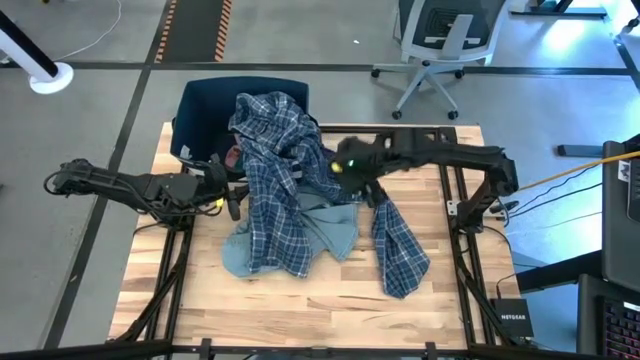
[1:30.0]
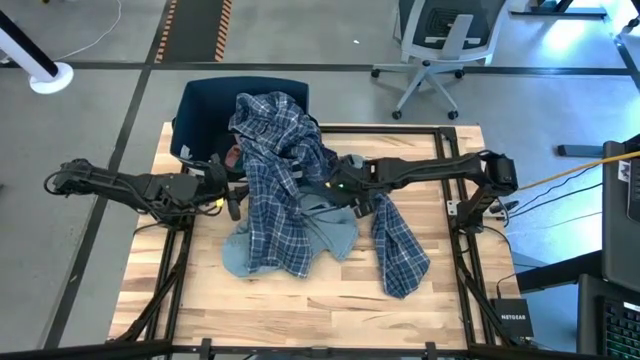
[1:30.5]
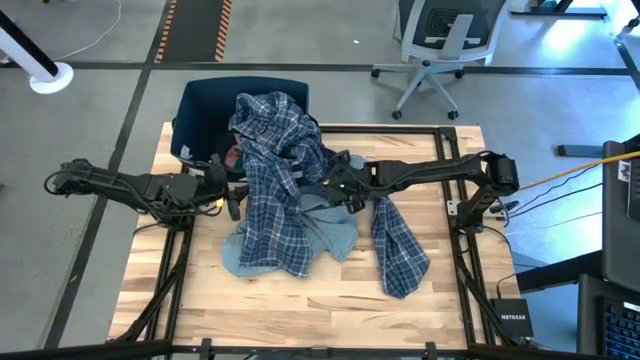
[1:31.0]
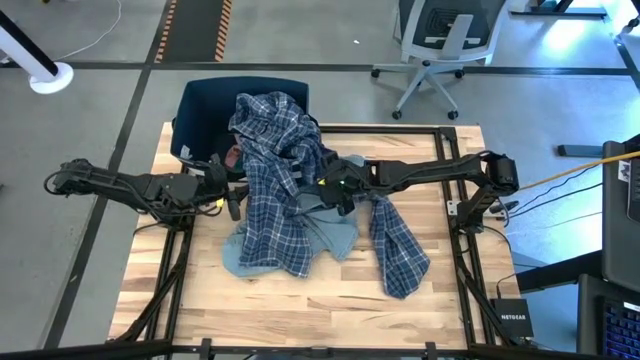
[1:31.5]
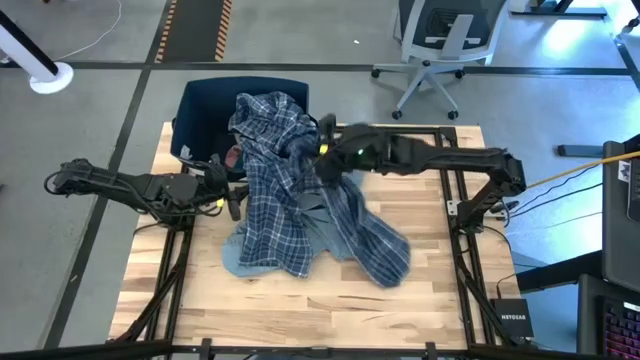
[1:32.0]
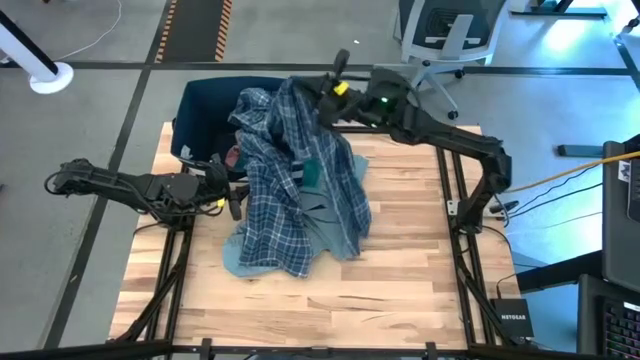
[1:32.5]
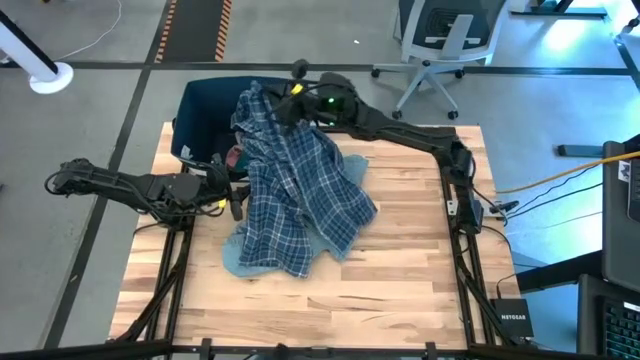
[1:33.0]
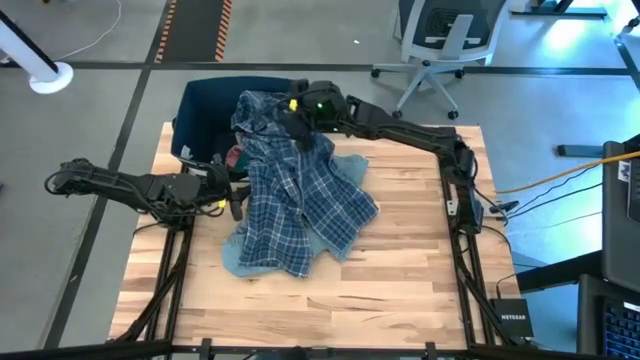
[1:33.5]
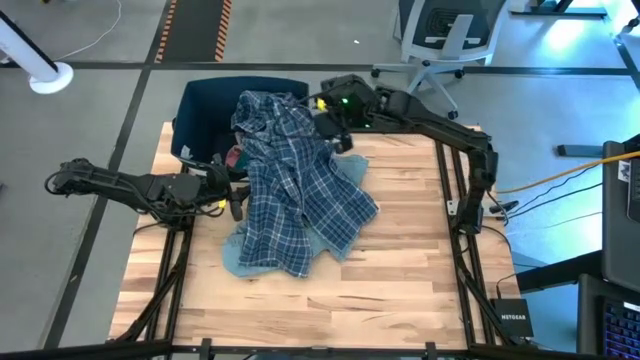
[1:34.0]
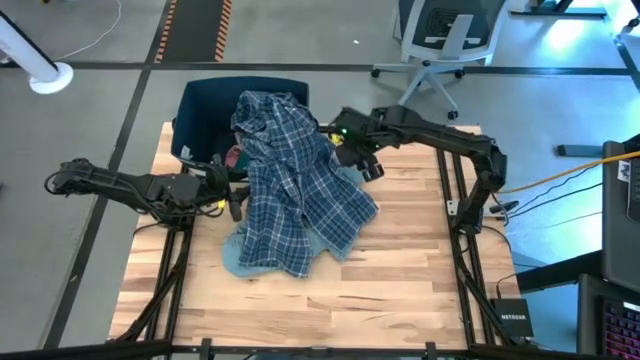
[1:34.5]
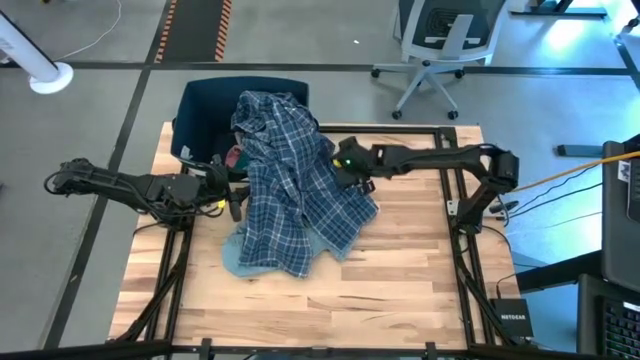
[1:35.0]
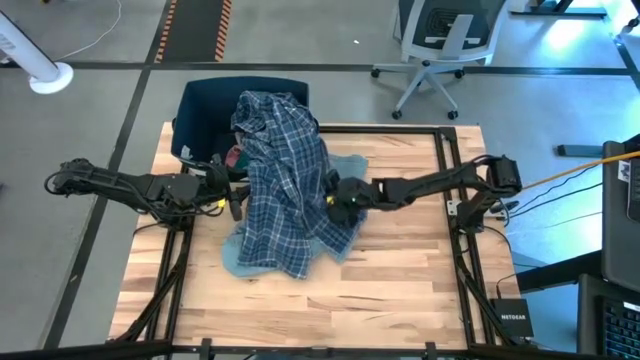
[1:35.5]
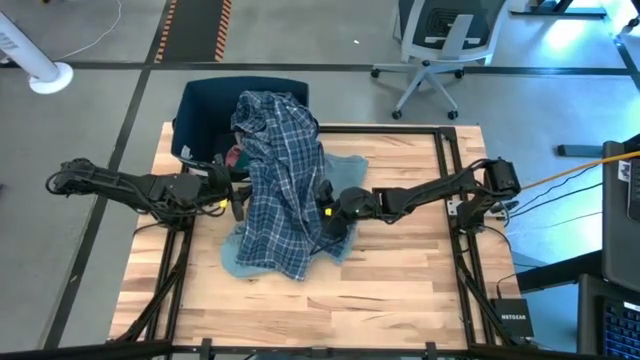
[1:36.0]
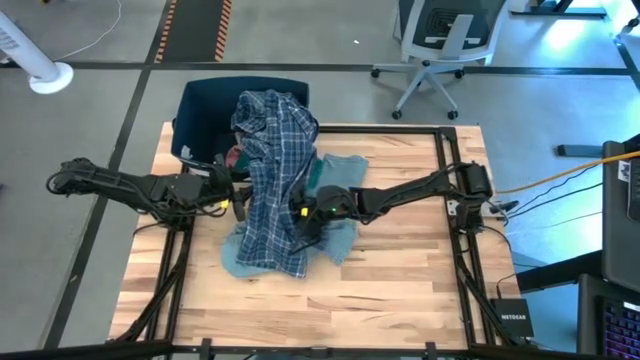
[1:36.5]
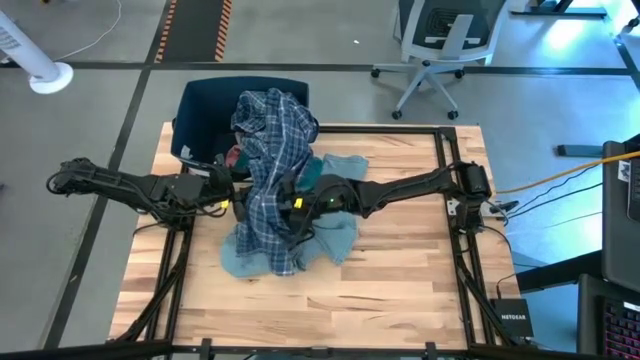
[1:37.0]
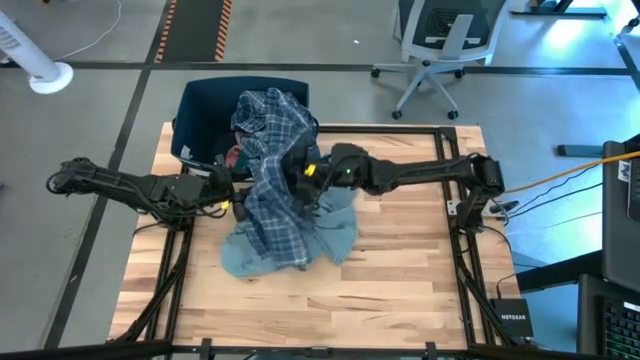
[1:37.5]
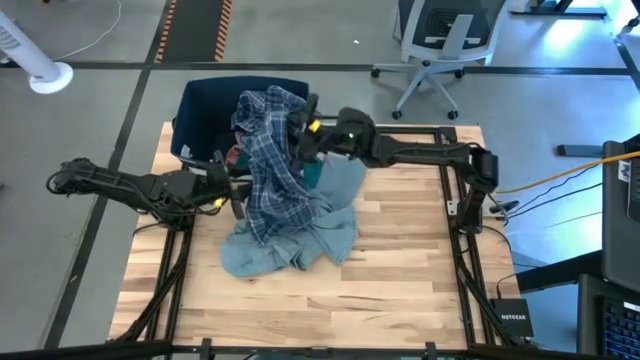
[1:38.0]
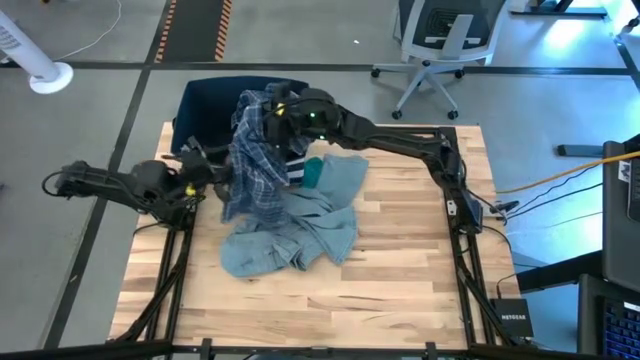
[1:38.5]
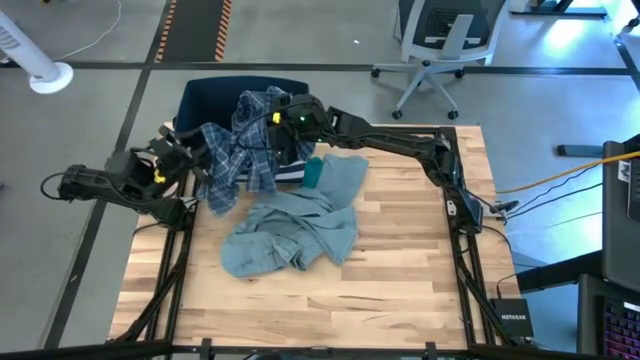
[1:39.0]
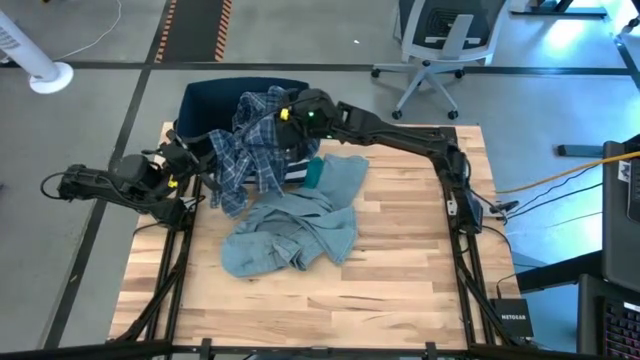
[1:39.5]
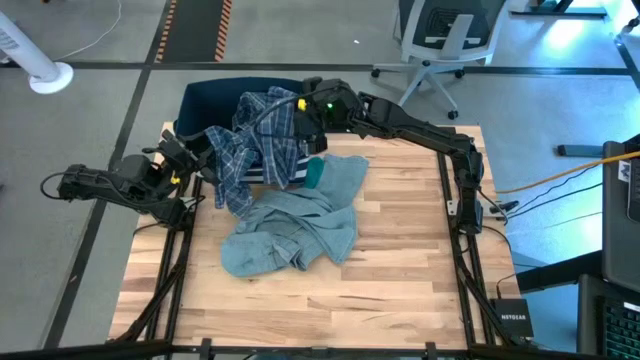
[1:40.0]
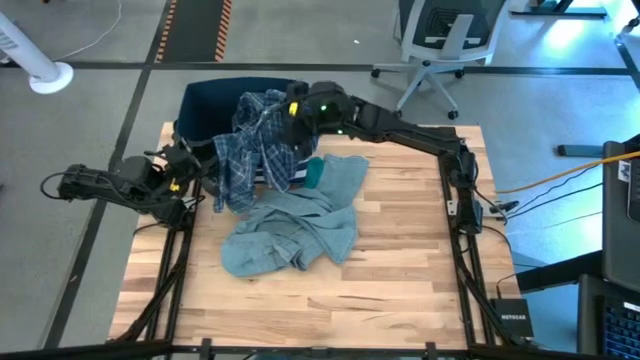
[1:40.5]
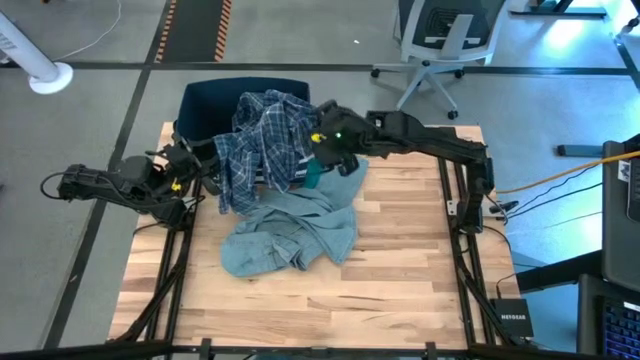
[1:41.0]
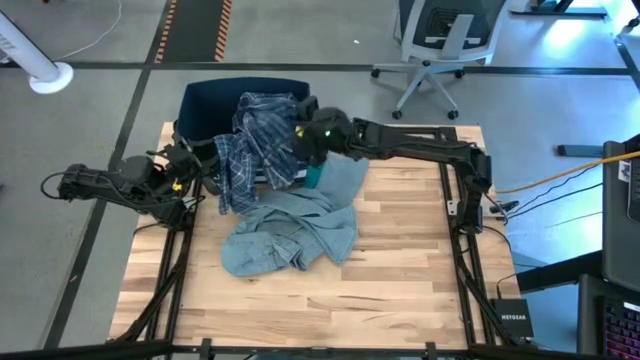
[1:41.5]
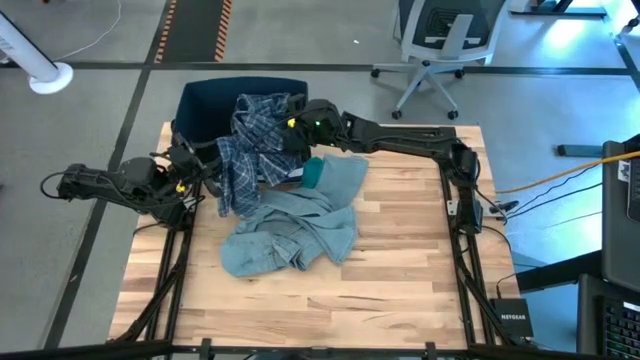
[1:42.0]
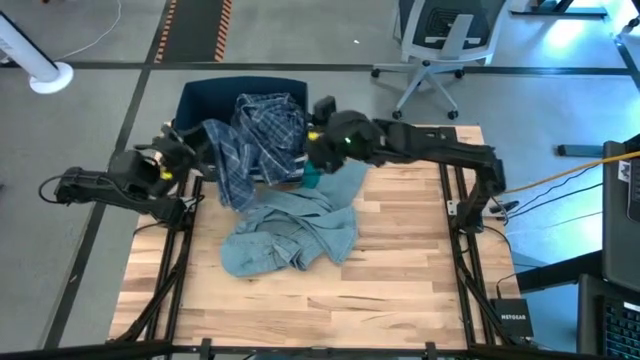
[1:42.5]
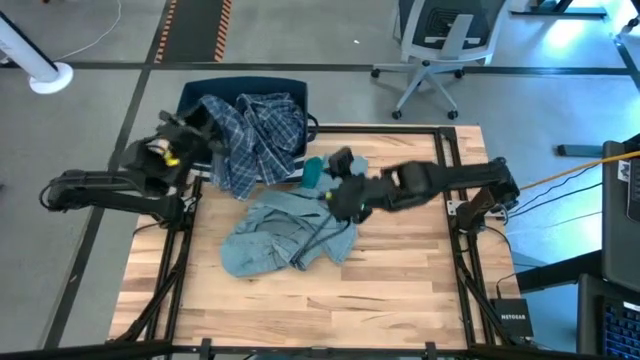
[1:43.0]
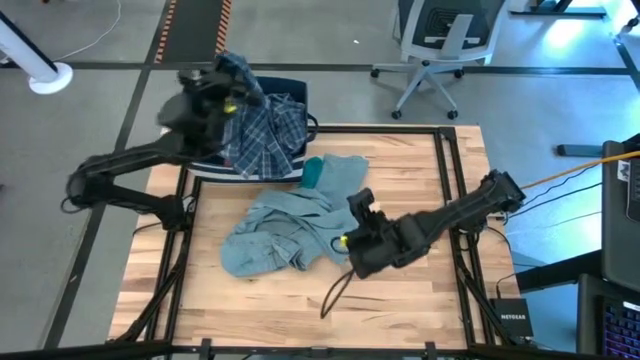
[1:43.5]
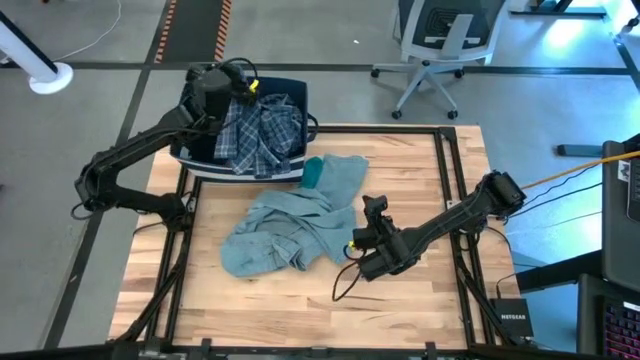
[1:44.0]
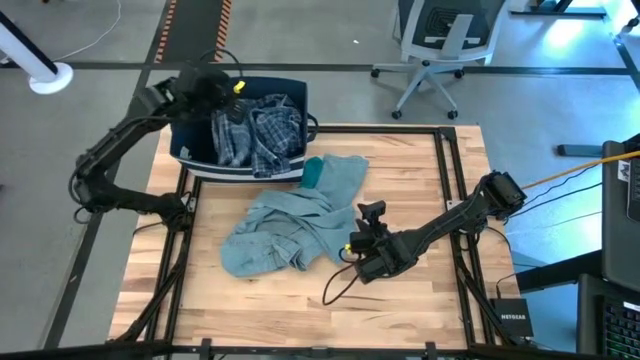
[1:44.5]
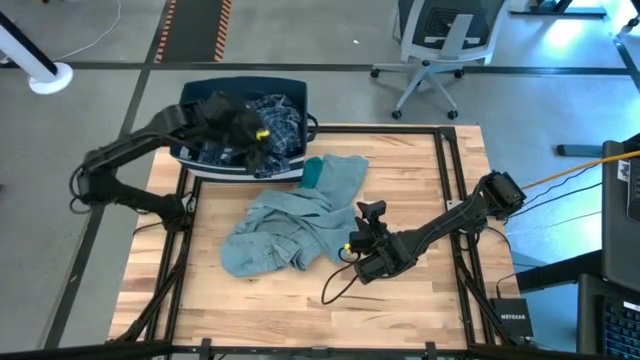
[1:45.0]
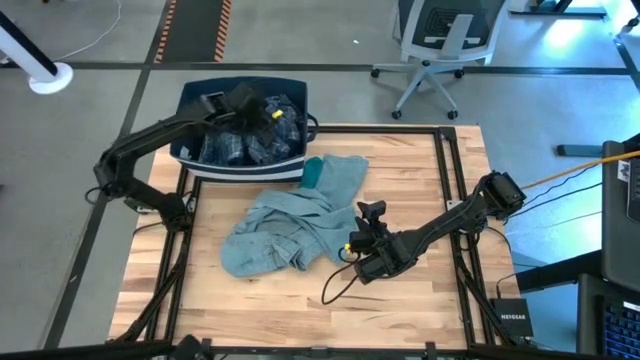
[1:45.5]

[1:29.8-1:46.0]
Task: Sort clothes
Put the blue patterned pajama into the blue laundry bin

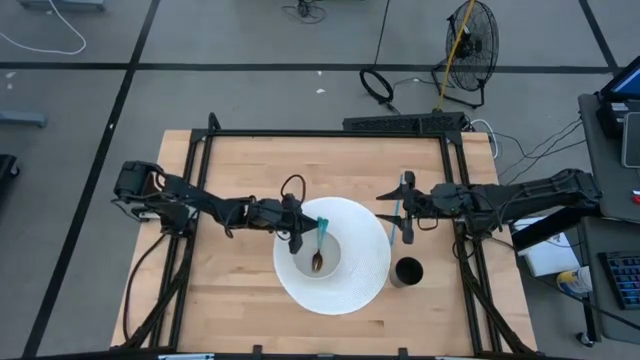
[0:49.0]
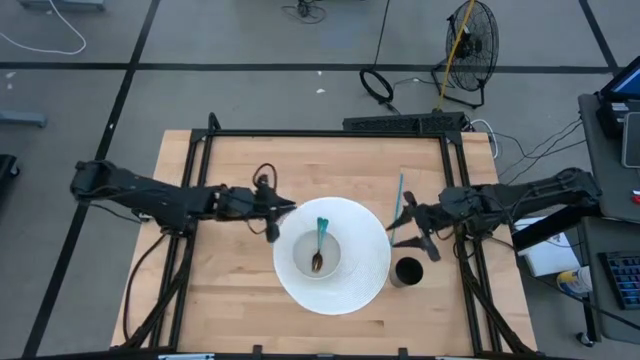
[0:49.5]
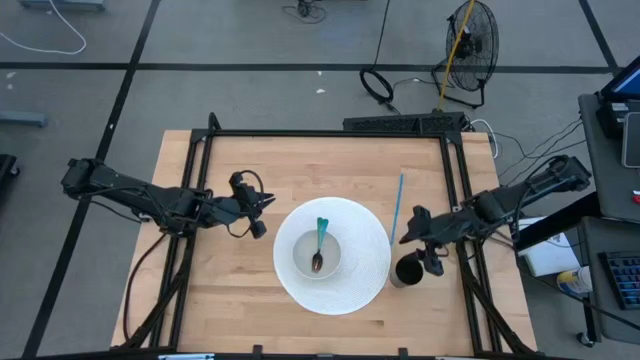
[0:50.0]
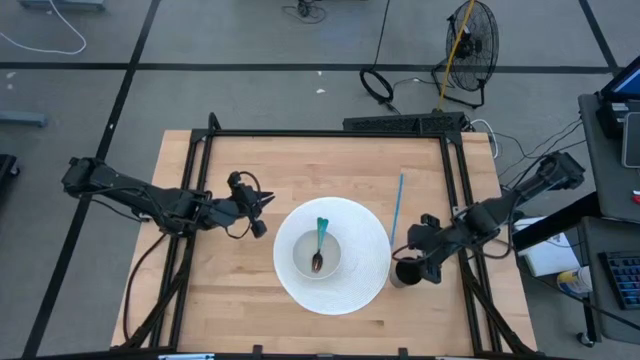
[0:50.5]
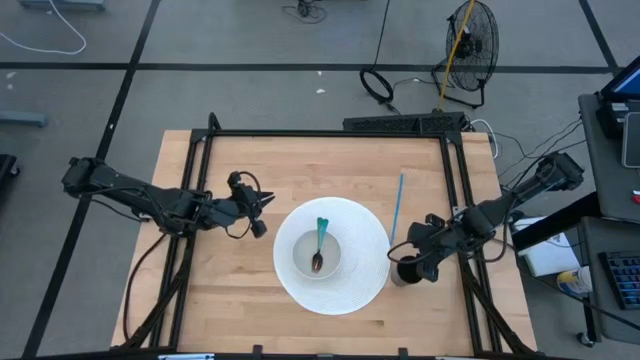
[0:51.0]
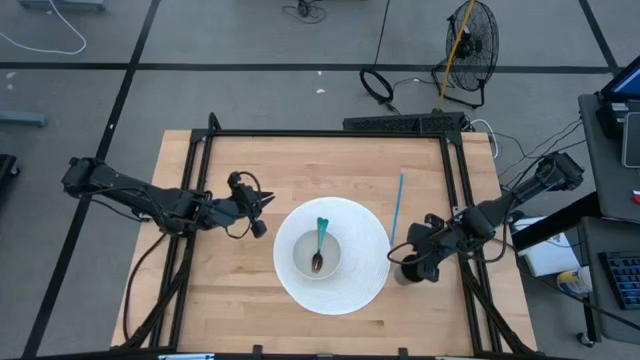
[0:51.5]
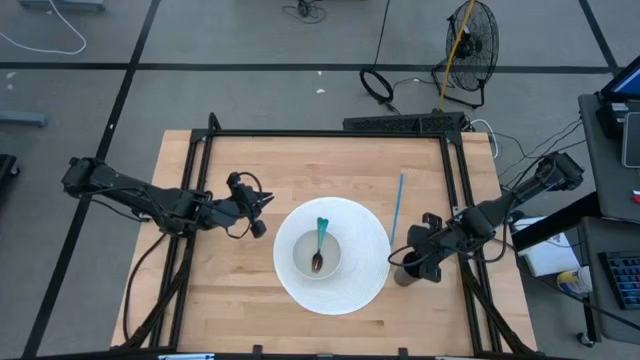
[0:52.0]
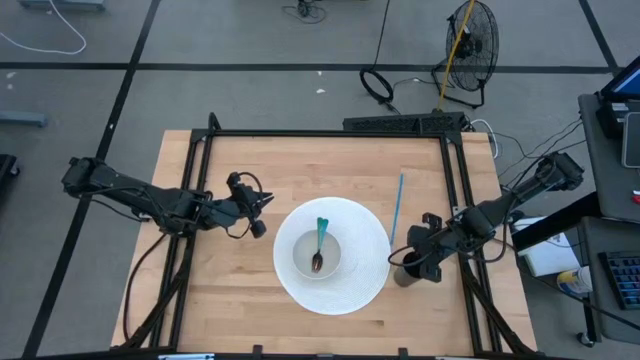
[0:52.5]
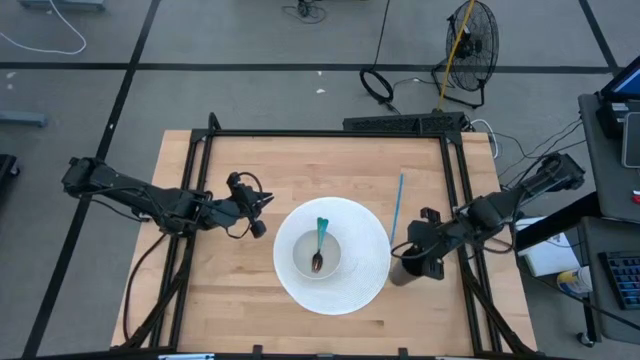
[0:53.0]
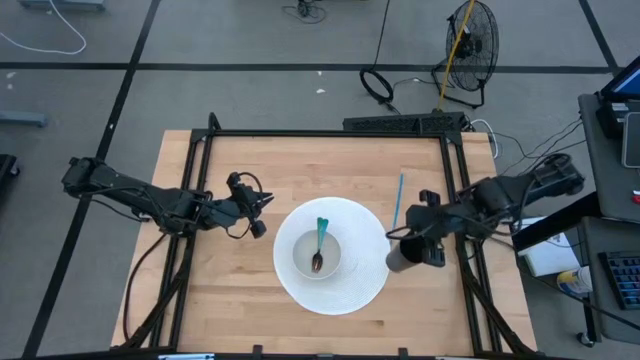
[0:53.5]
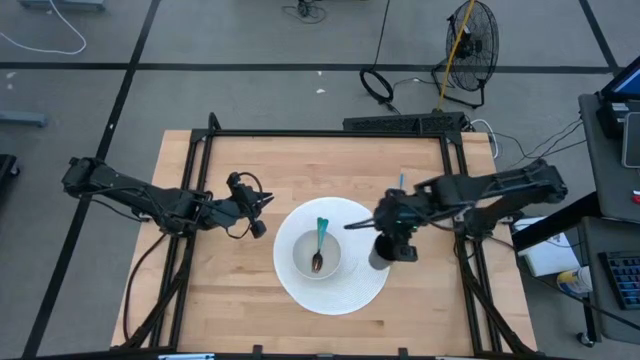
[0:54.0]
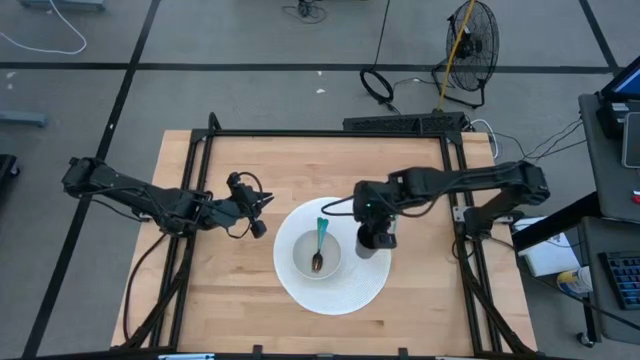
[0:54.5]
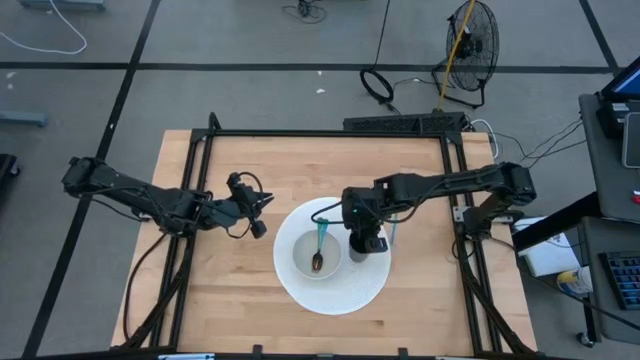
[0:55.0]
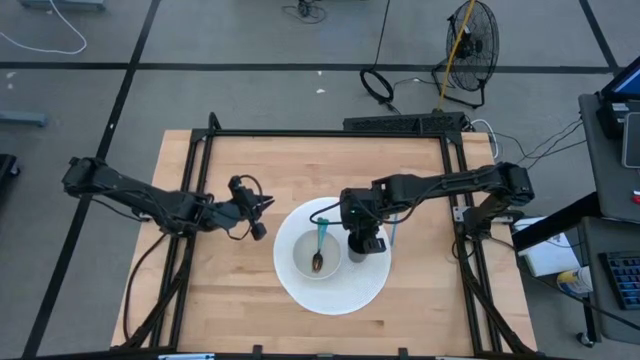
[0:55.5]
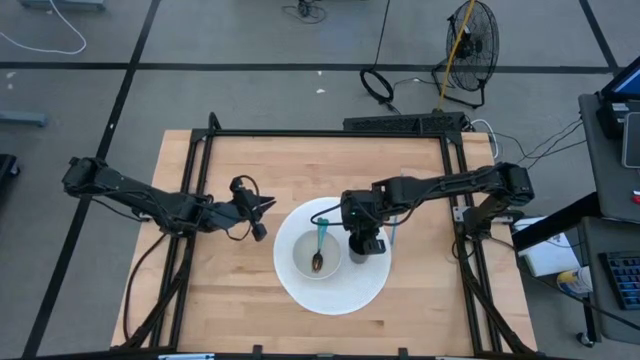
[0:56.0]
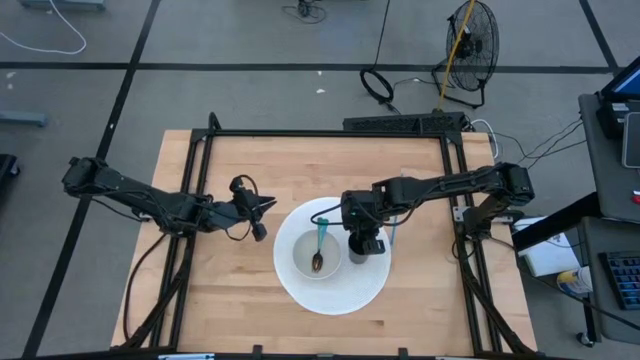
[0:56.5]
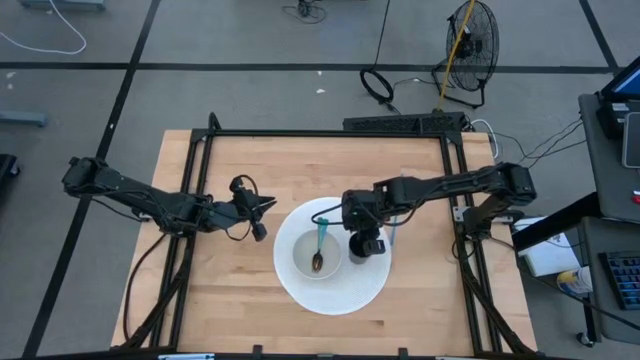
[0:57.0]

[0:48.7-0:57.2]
Task: Pick & Place Utensil
Put the black cup to the right of the white bowl on the white mat
